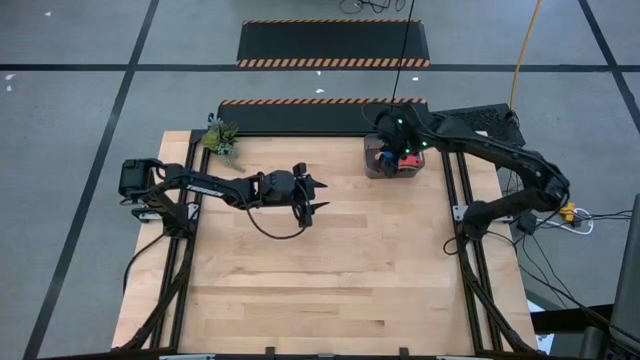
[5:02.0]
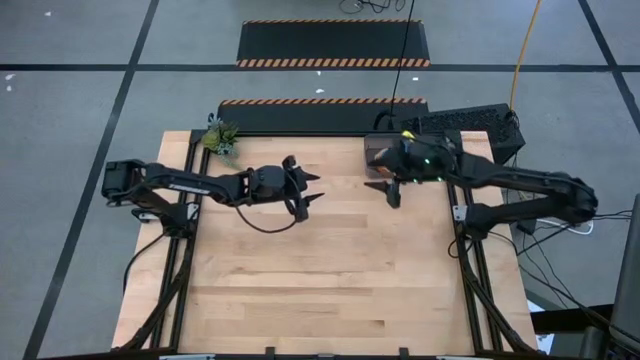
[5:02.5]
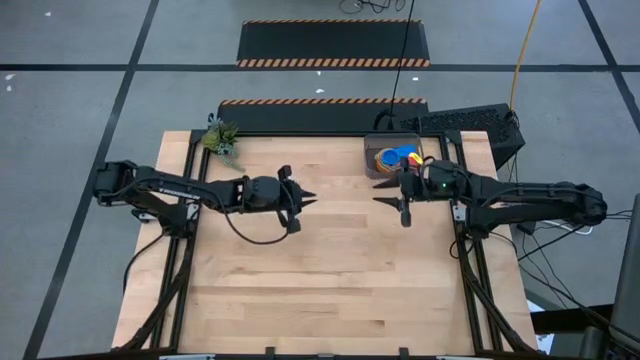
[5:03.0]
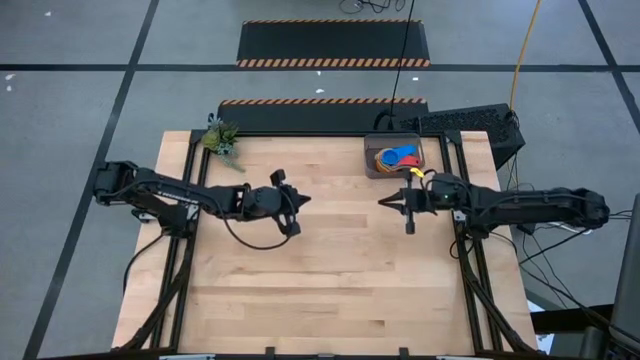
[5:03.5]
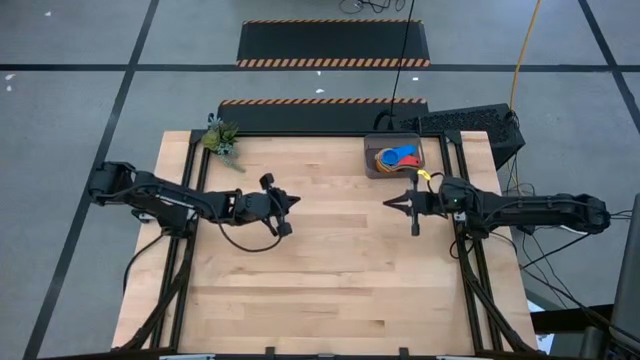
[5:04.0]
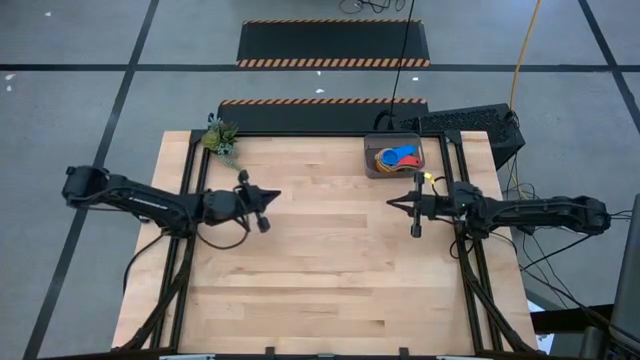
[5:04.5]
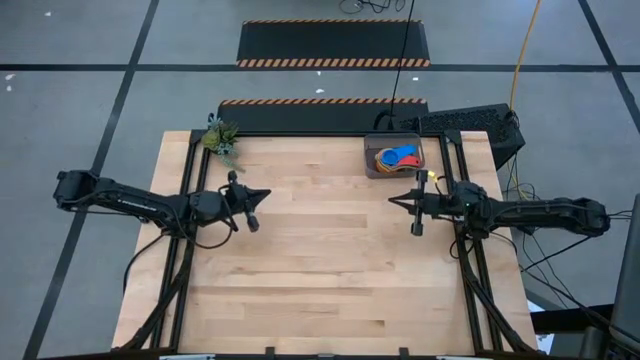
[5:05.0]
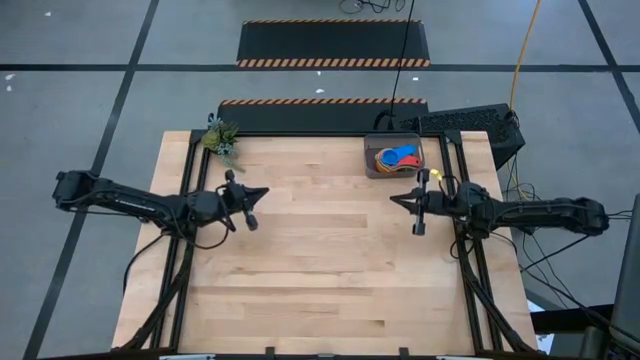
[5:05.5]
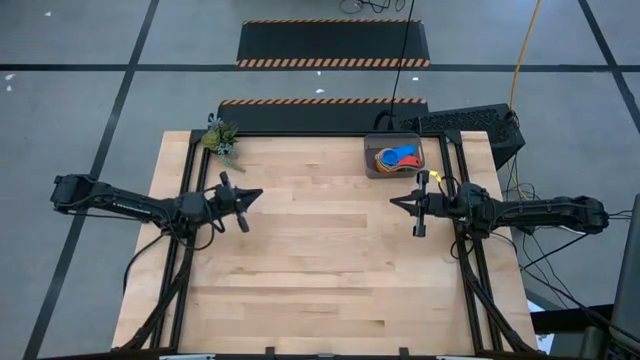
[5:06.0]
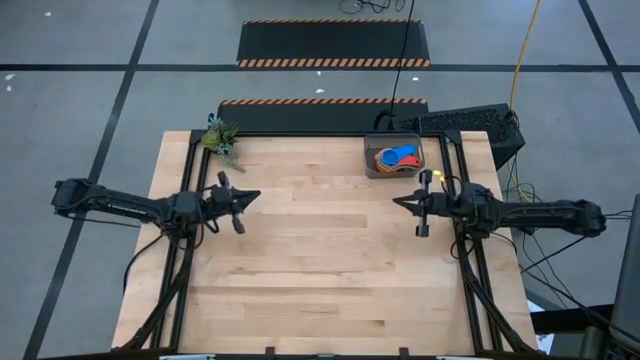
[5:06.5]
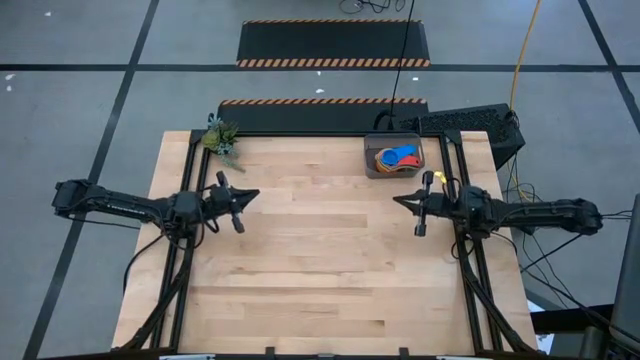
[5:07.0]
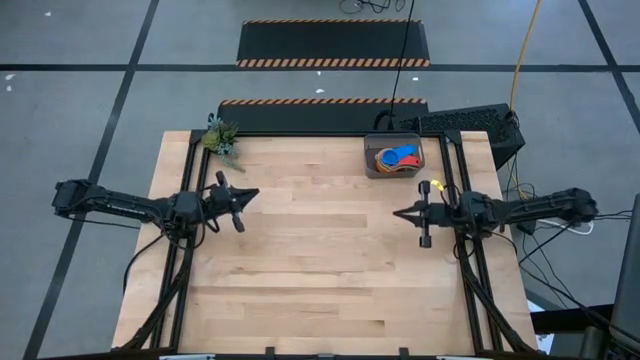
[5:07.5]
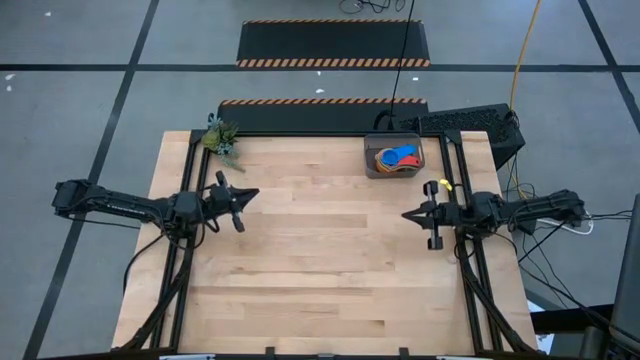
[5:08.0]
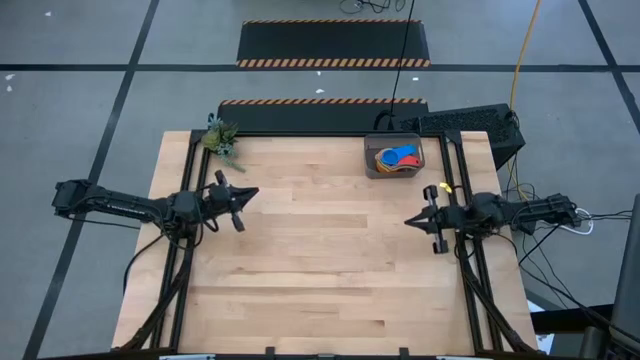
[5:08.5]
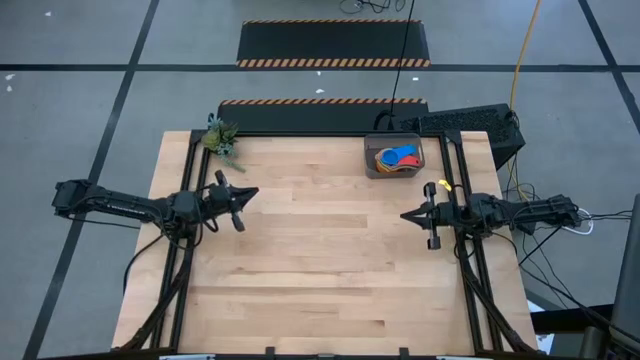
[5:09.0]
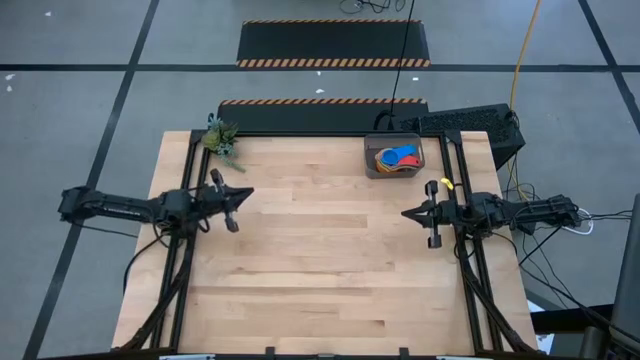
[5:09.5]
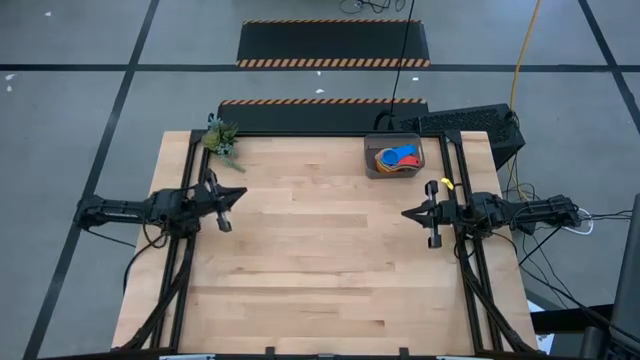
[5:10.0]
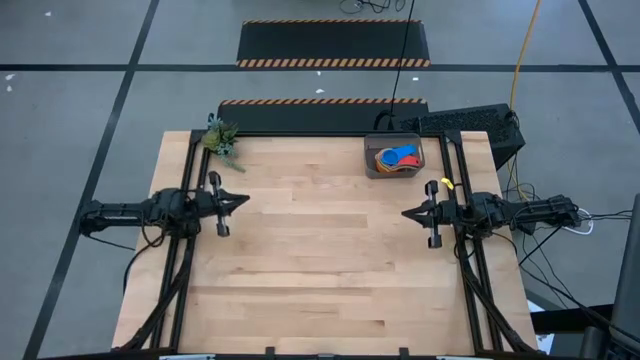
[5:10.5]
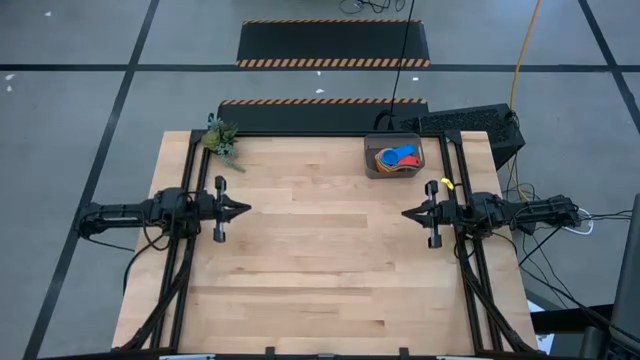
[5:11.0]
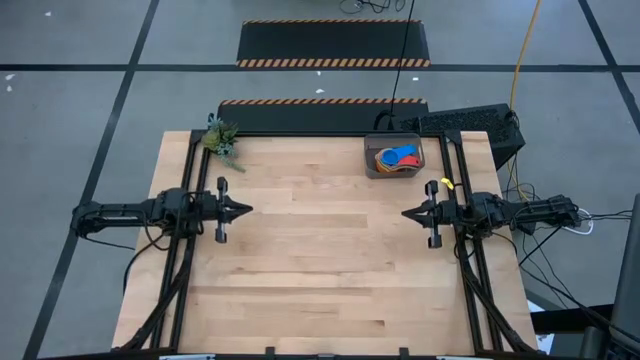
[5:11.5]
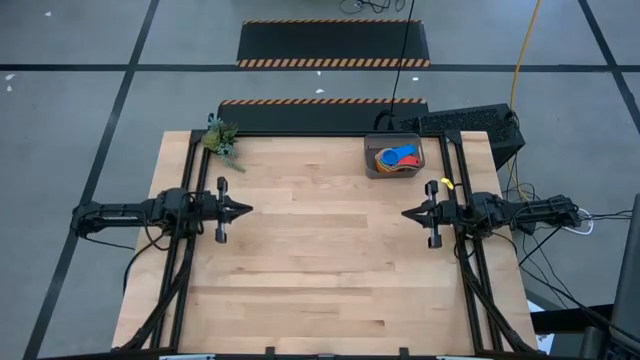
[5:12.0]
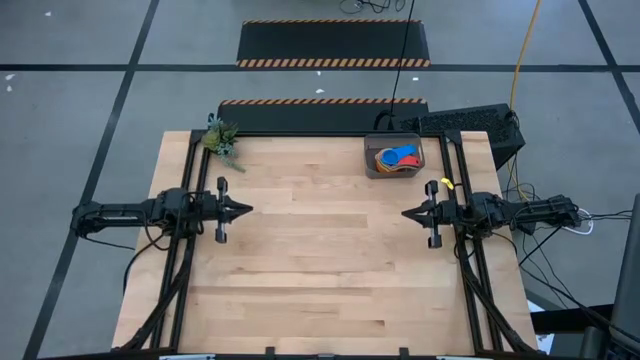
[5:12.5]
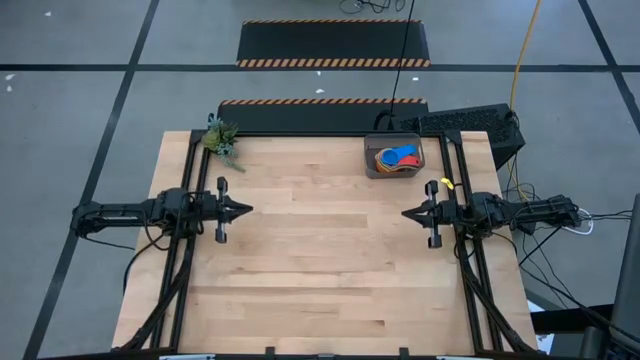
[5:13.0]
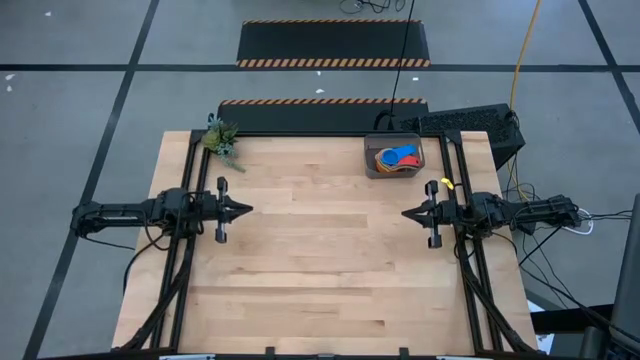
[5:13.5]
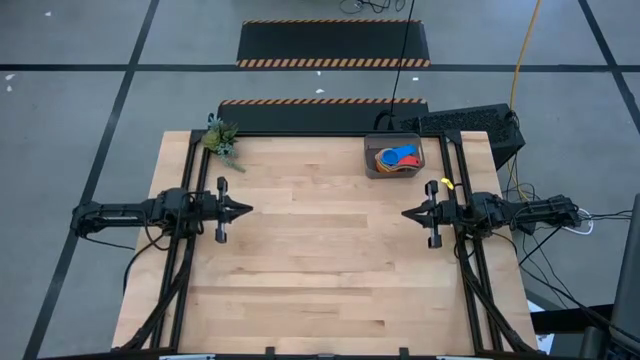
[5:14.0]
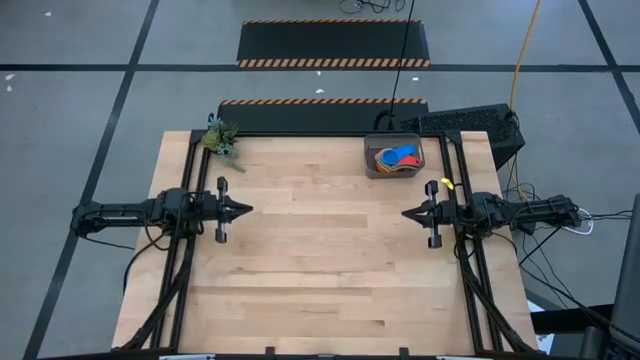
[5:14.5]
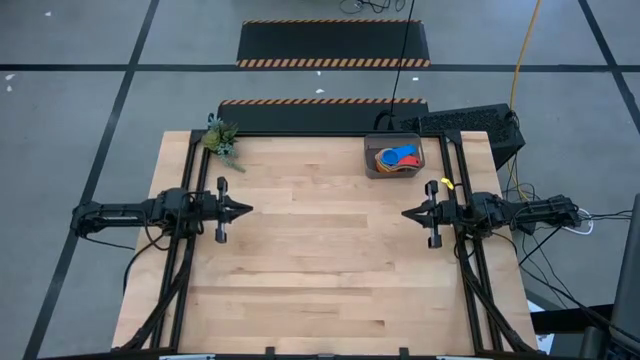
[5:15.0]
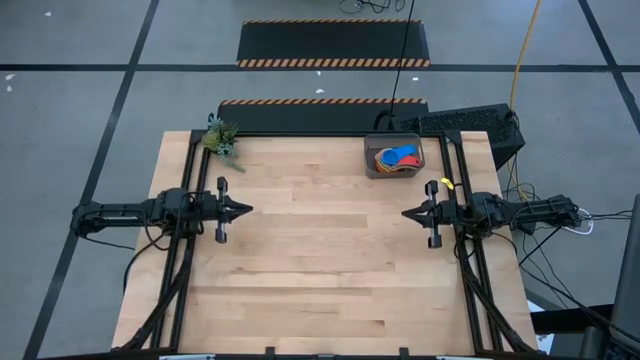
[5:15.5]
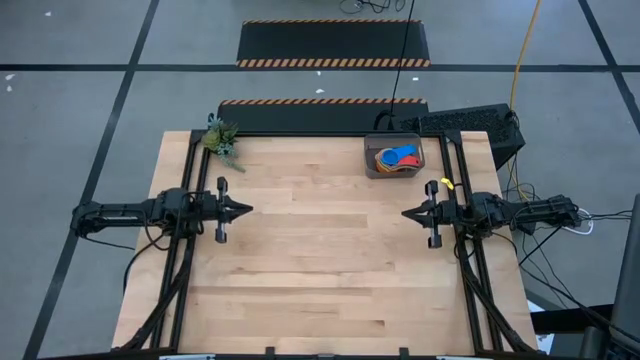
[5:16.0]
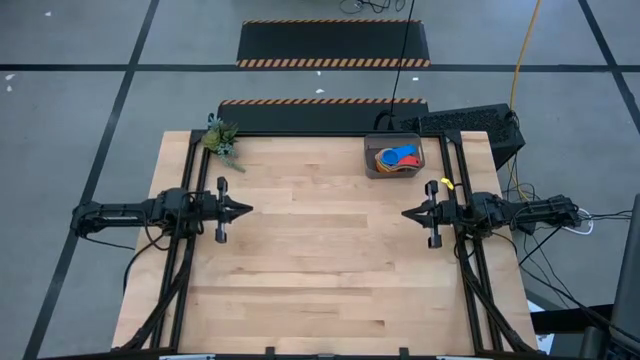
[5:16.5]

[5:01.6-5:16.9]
Task: Nest measuring cups in basket
Return to Home Position

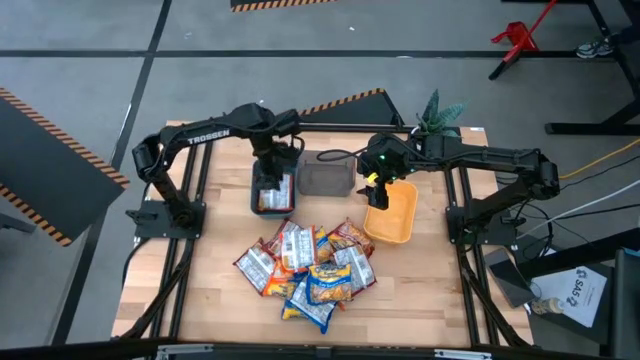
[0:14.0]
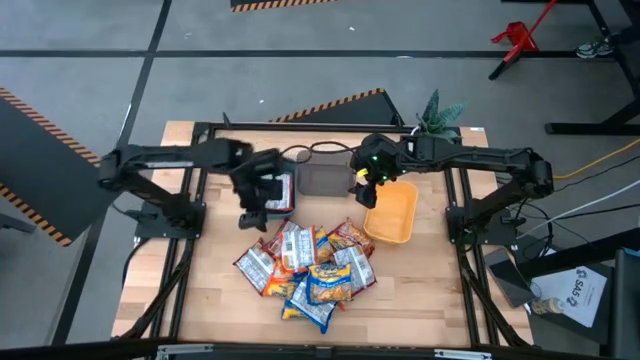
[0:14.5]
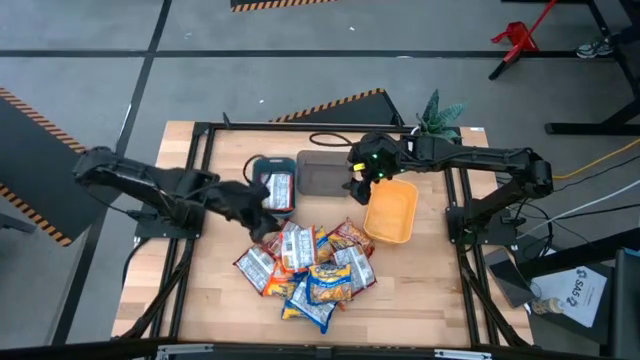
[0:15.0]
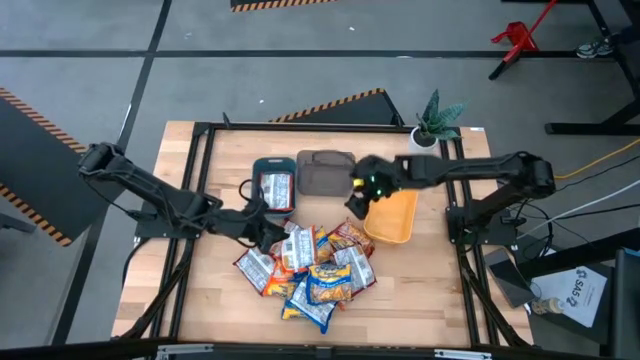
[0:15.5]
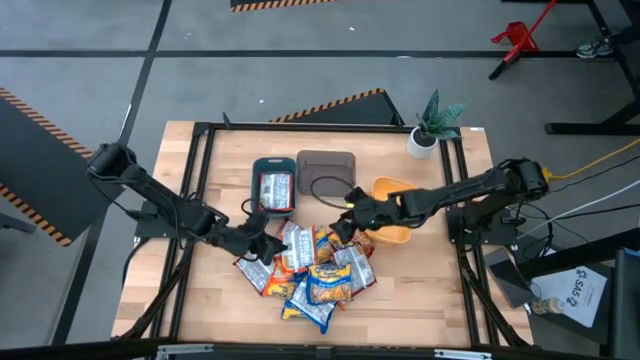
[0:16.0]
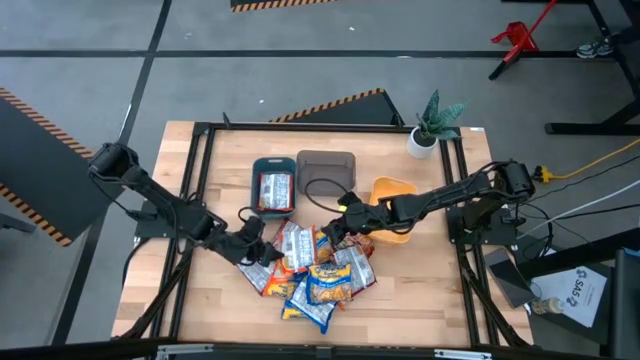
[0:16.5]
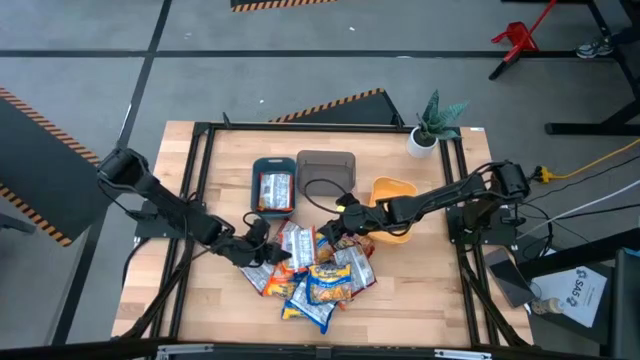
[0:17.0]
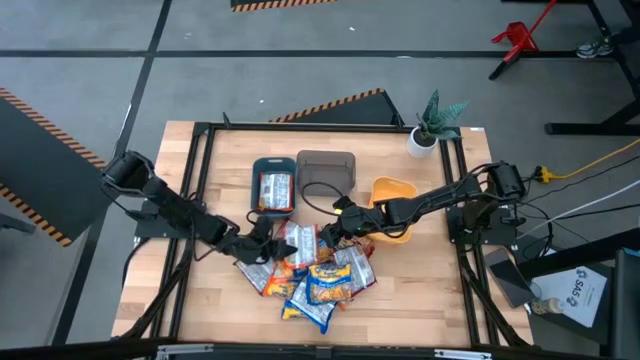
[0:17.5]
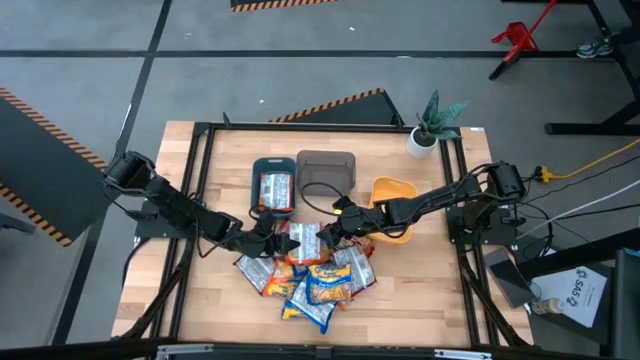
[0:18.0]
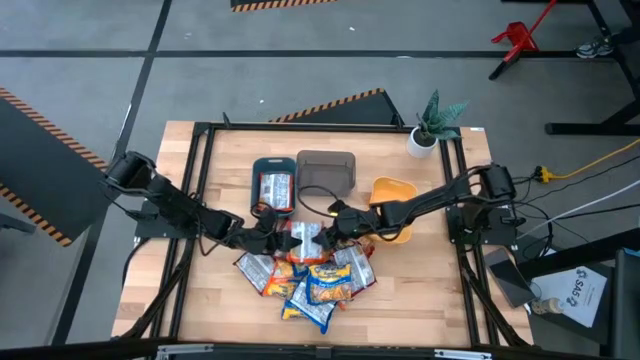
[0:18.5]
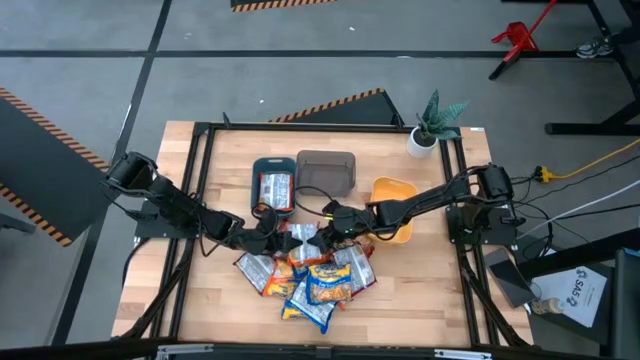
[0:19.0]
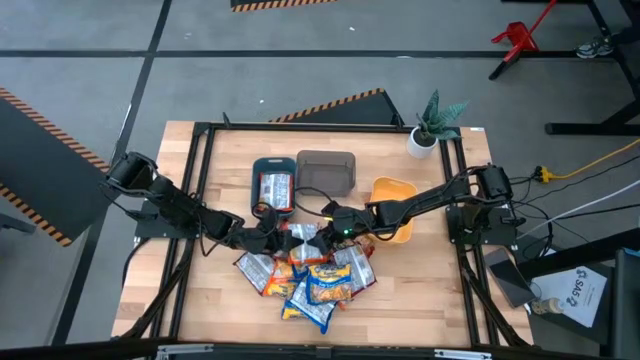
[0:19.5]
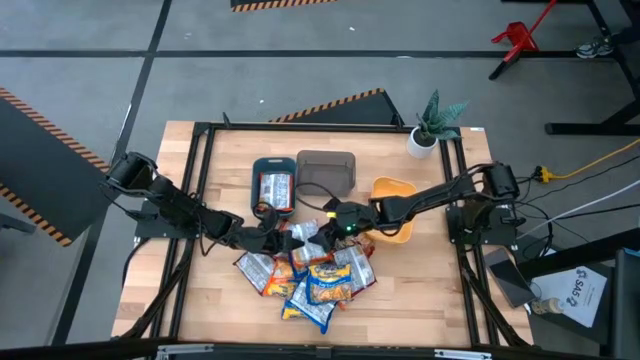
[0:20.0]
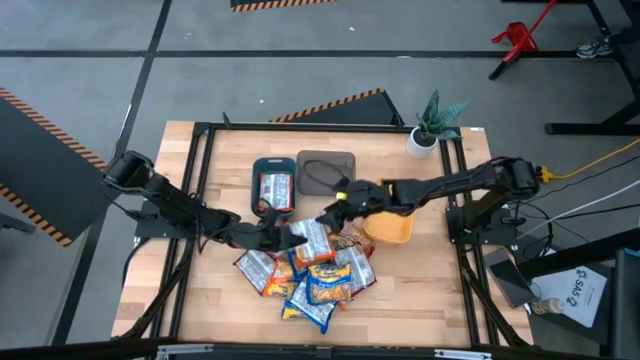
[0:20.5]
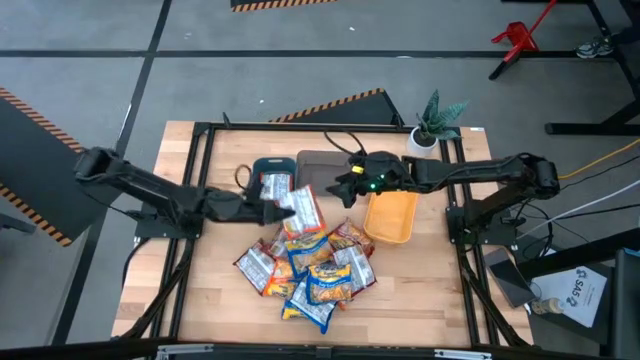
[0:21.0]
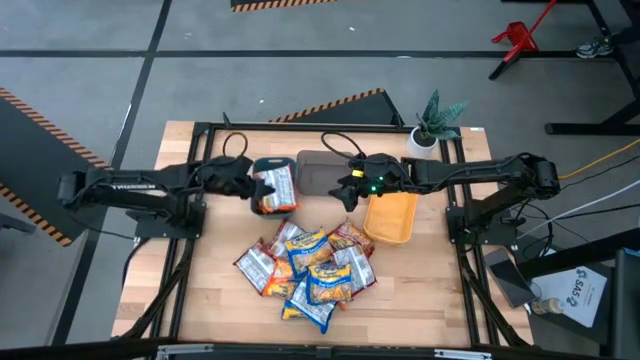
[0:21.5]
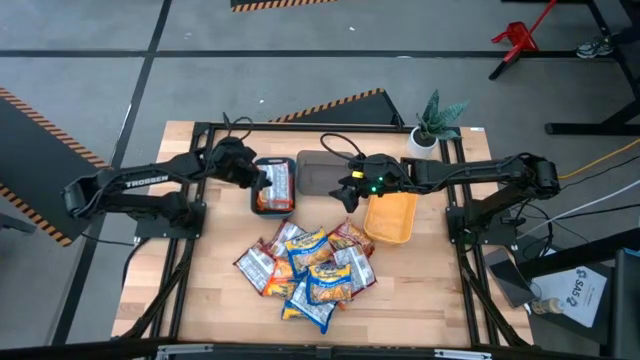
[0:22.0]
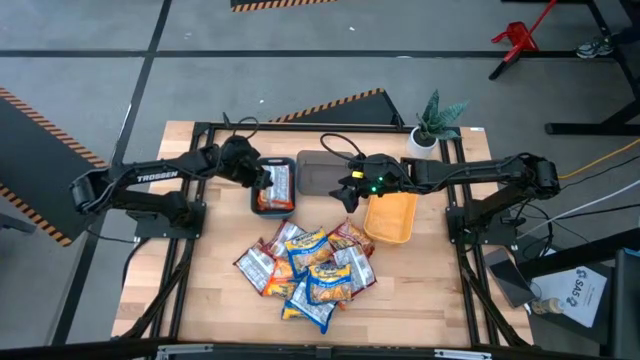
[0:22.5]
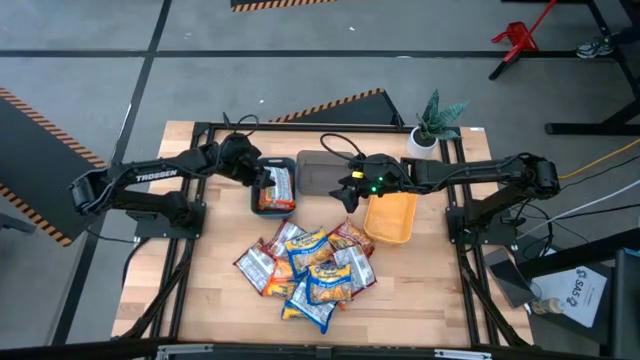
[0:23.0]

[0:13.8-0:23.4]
Task: Sort Maruchan noodles
Put the orange noodle pack into the blue bin
